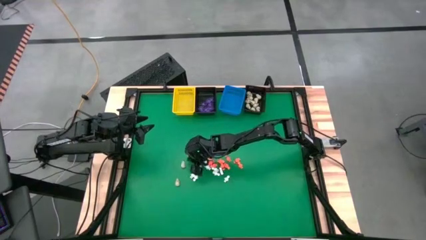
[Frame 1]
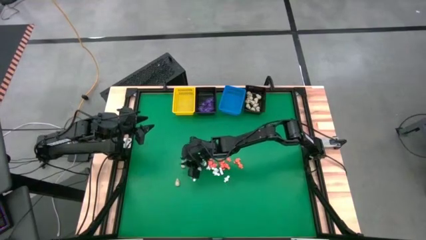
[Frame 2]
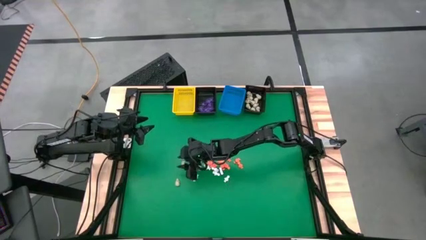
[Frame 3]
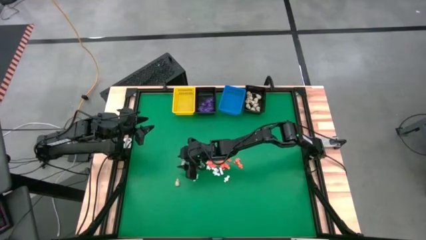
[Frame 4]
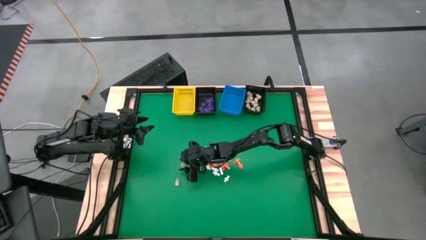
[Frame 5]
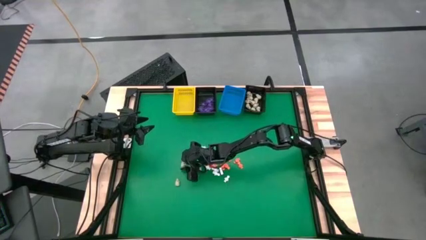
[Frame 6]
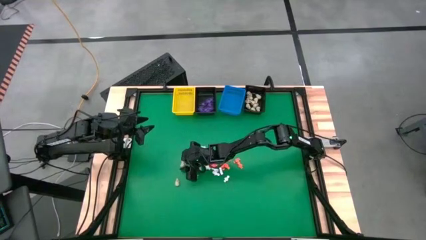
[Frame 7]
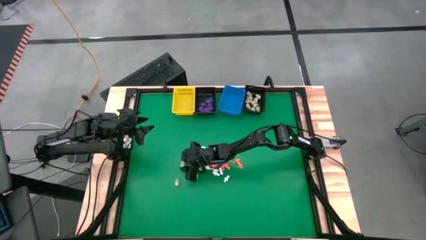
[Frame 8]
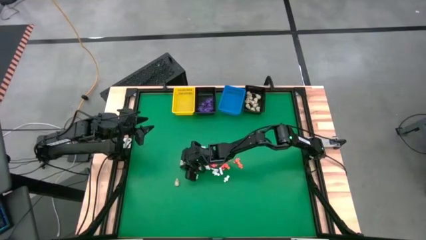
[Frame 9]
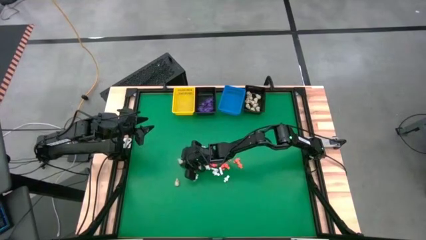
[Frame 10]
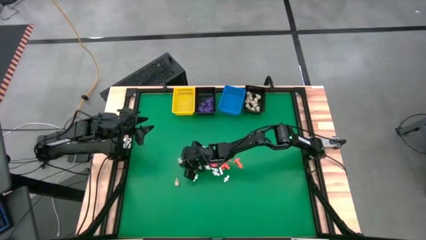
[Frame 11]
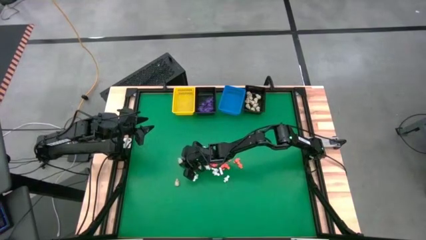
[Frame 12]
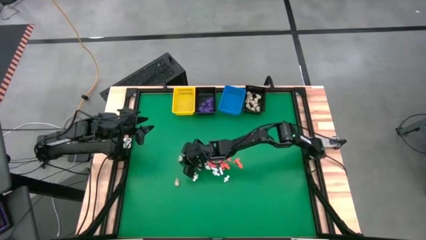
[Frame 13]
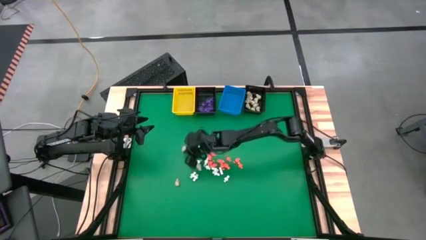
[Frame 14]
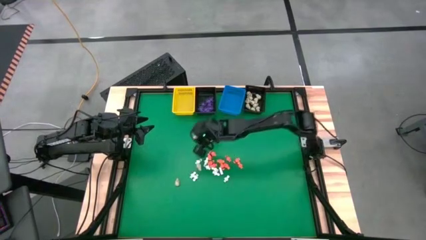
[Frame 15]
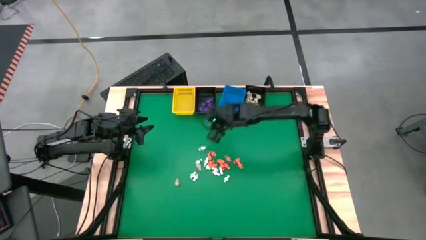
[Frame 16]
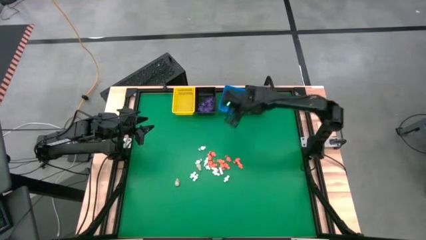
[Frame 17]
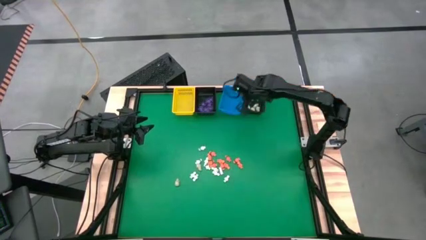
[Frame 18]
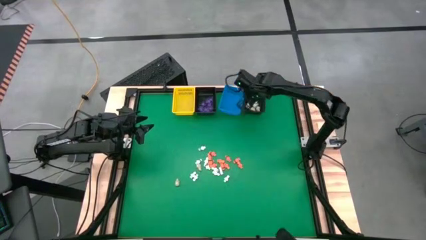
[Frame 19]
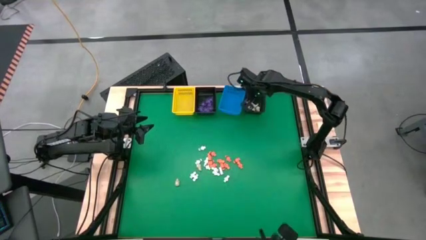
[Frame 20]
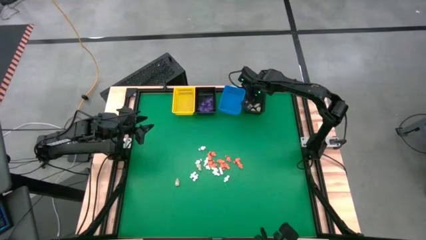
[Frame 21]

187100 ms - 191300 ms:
Task: Sort Halloween decoration
Put the white skull toy into the right black basket

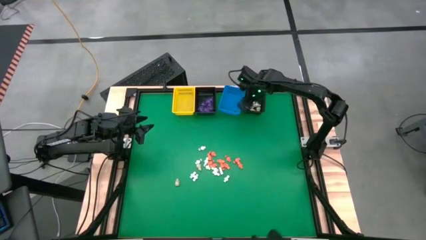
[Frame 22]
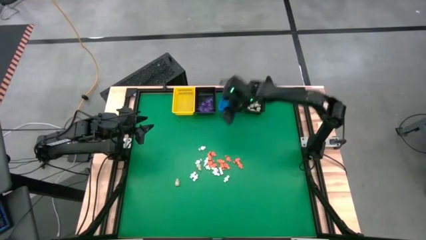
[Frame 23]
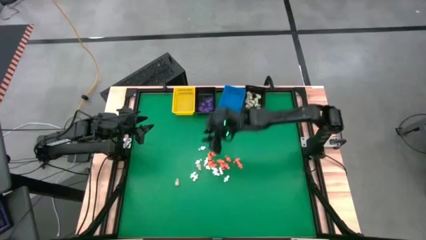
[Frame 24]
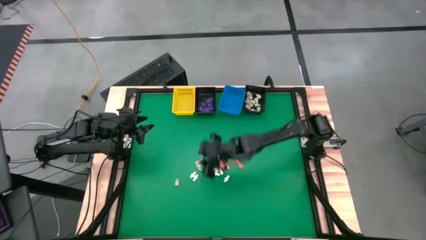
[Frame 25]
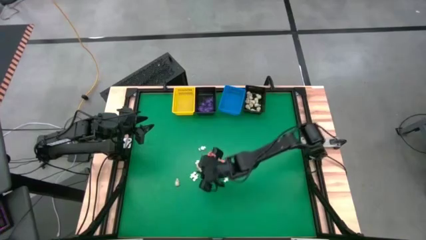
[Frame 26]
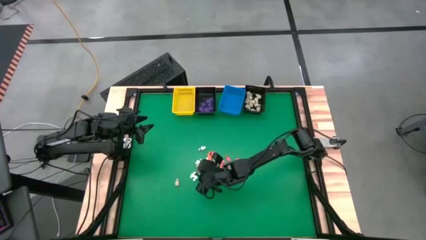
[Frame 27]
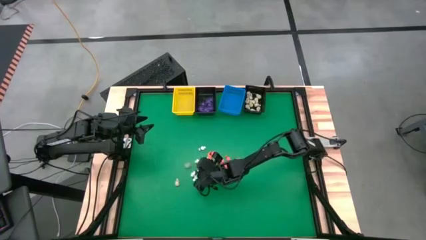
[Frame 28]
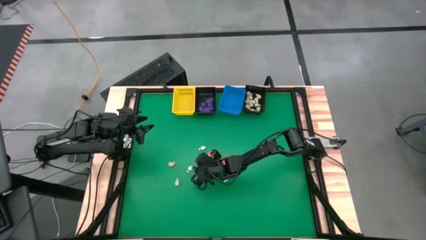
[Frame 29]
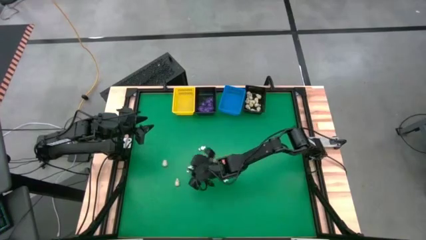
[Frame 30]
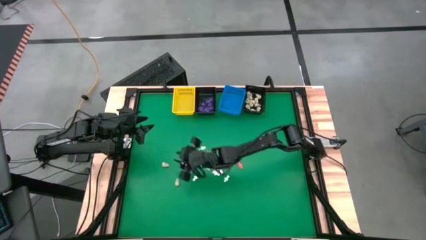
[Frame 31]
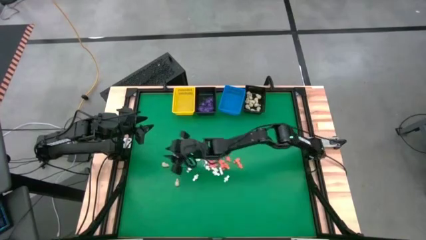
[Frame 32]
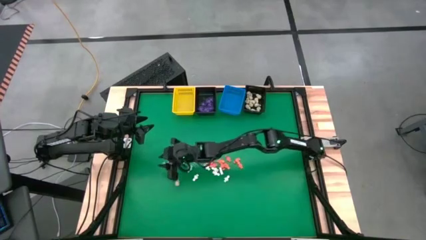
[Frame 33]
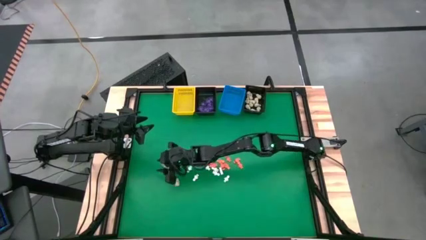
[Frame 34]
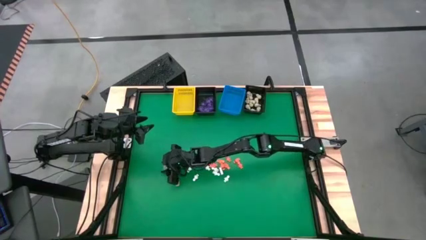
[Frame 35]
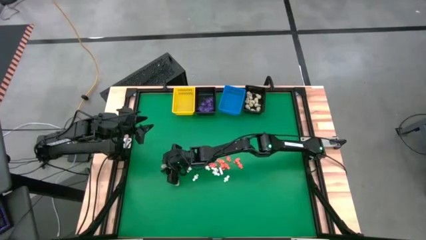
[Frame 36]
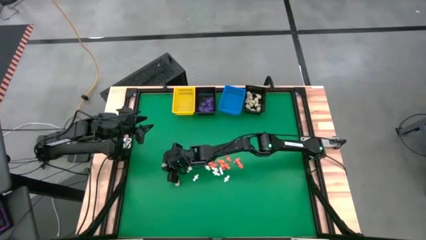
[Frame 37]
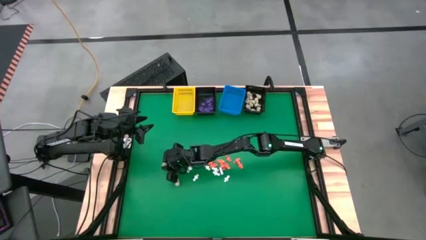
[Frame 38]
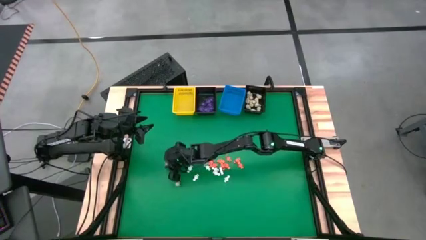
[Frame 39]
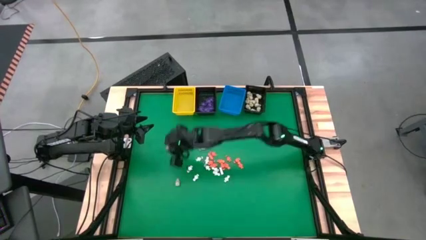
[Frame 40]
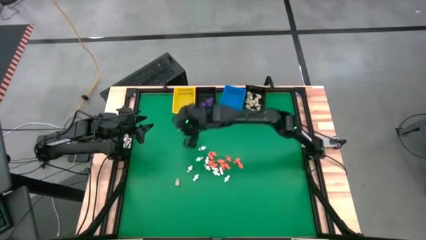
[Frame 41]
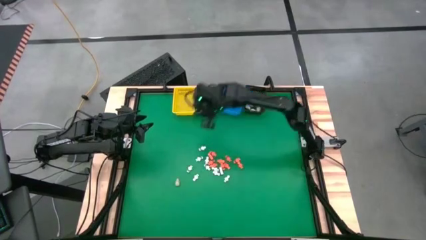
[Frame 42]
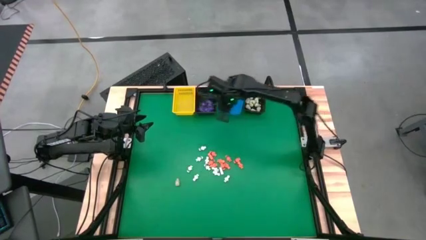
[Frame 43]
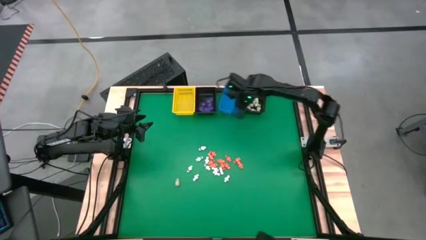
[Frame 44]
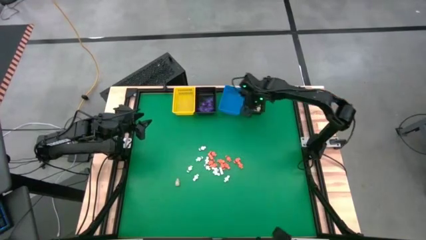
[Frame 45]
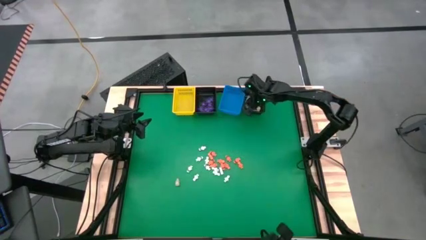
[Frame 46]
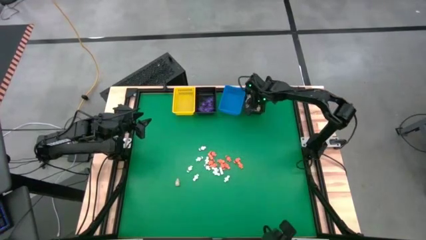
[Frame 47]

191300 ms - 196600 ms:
Put the white skull toy into the right black basket

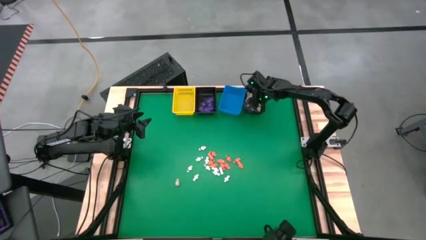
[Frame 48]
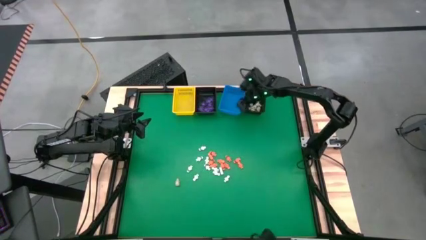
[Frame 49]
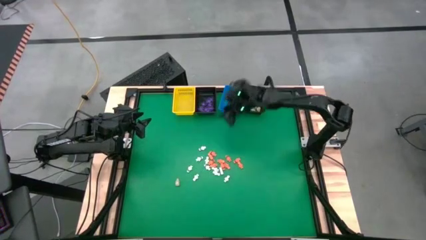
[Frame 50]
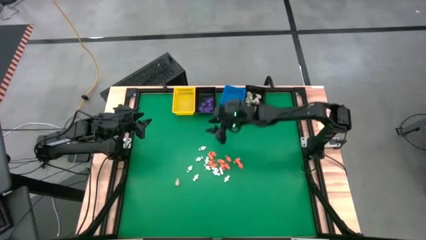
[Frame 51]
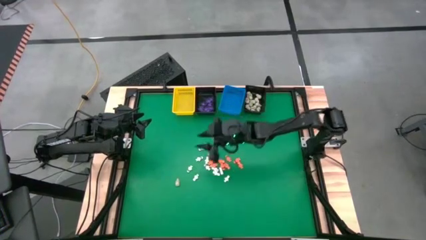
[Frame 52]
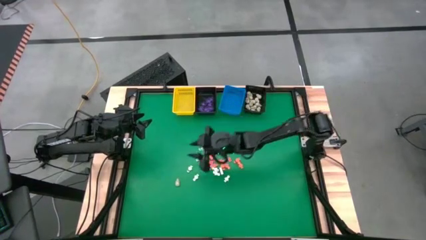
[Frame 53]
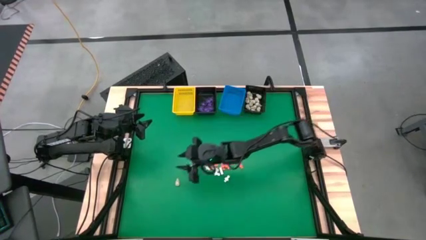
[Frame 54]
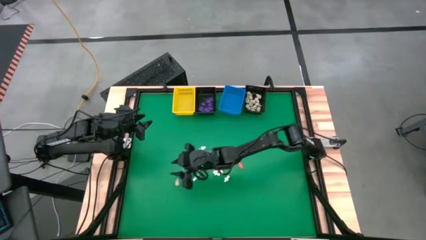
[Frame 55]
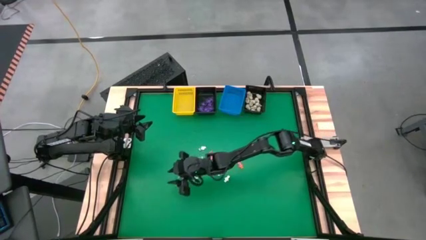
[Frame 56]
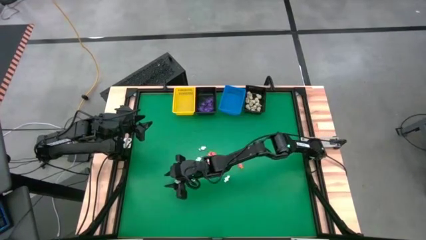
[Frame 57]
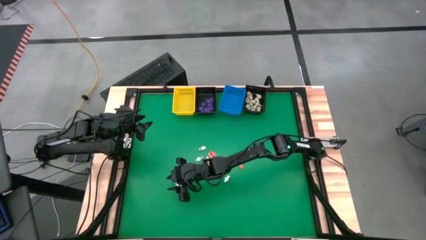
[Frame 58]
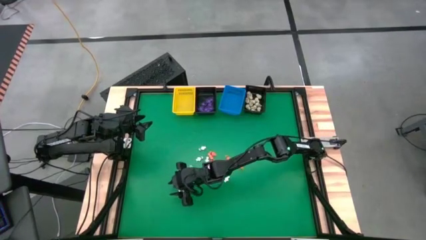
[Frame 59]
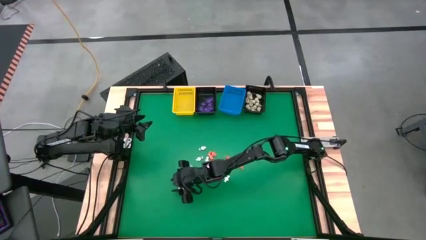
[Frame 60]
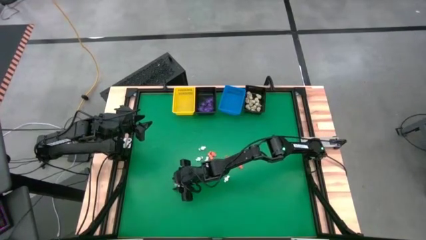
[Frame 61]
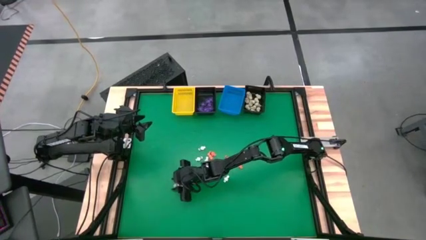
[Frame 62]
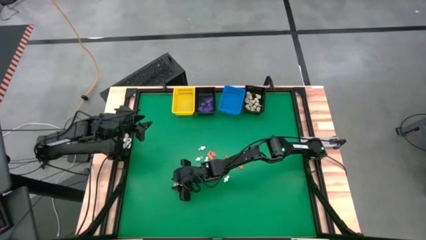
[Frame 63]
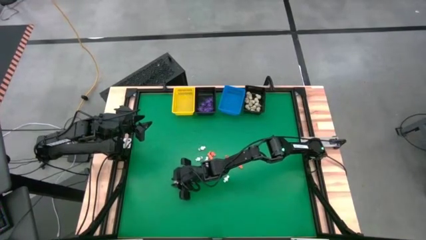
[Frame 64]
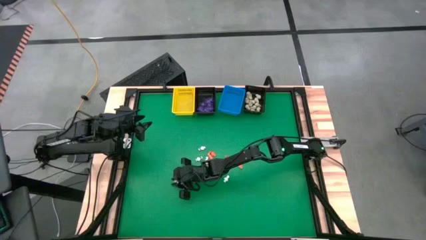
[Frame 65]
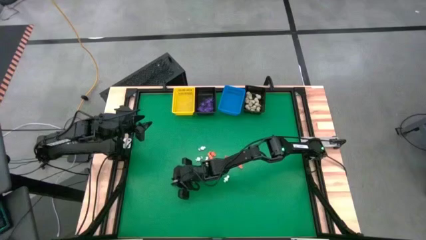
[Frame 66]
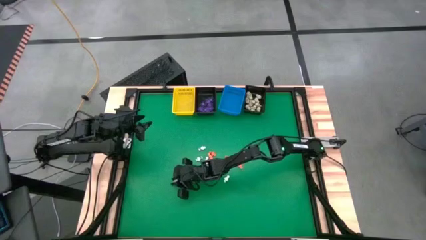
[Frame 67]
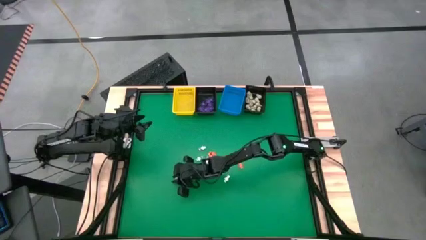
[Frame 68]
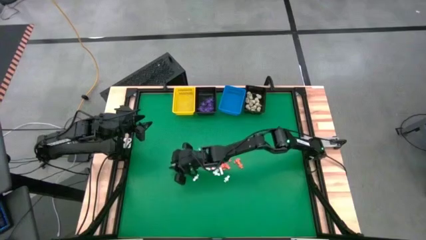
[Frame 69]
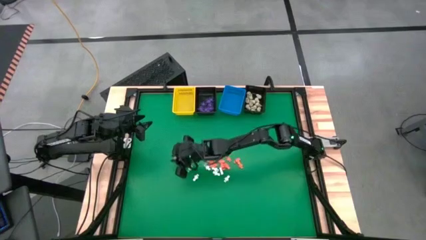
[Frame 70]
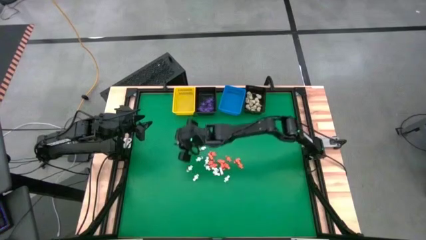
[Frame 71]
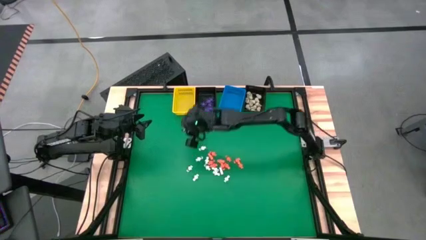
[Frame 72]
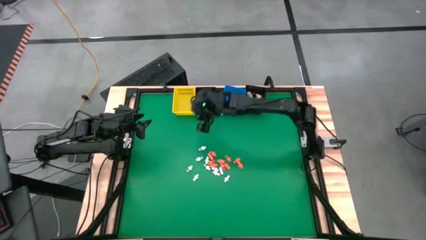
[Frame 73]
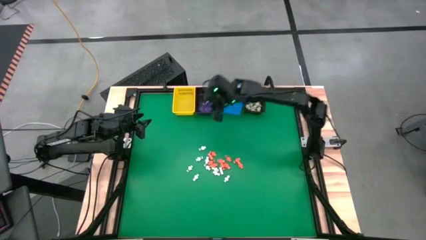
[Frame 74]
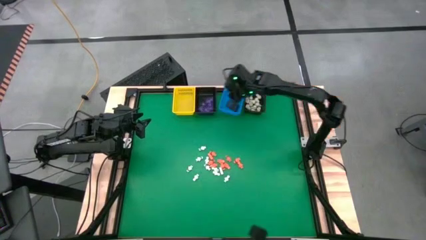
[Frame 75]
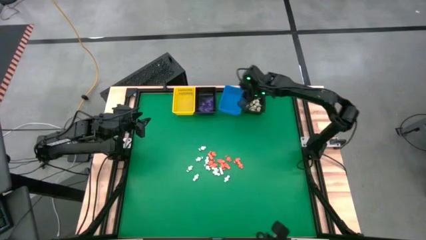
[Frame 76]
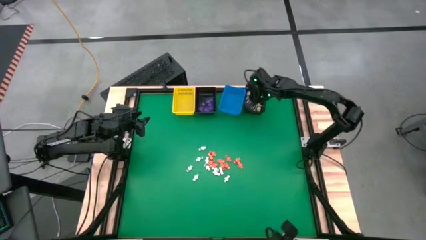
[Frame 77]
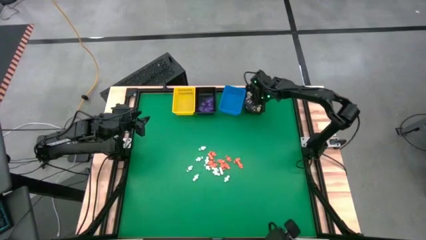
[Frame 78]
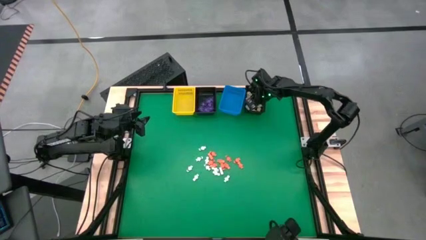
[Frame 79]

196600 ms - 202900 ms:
Put the white skull toy into the right black basket

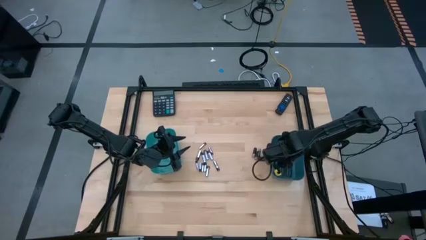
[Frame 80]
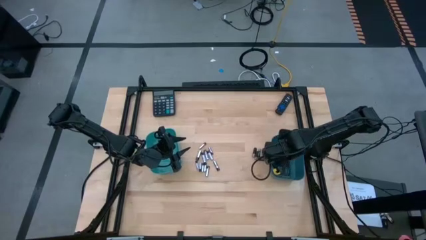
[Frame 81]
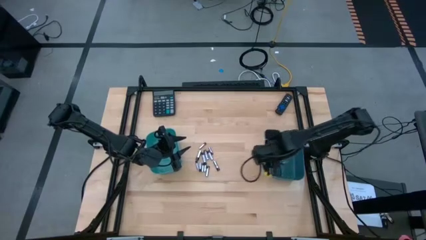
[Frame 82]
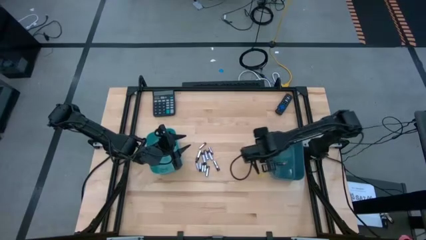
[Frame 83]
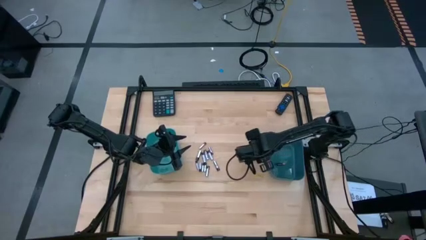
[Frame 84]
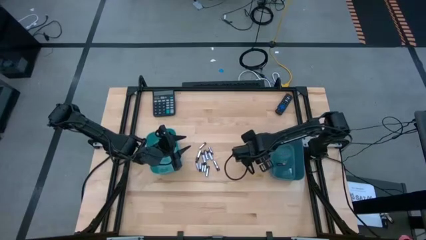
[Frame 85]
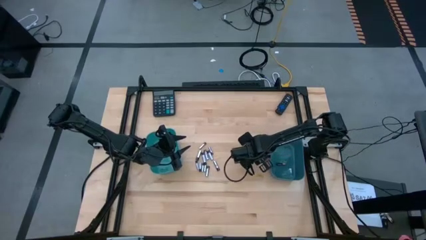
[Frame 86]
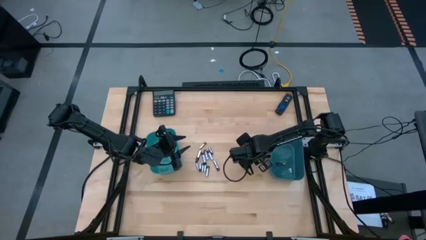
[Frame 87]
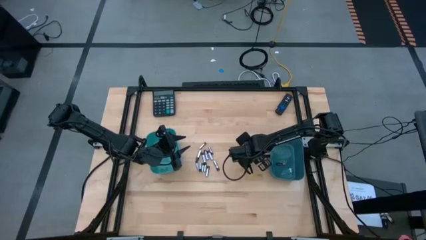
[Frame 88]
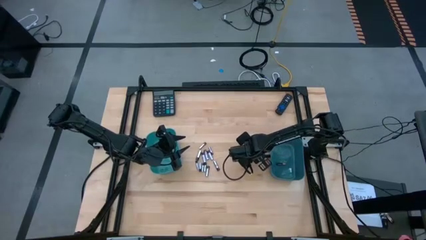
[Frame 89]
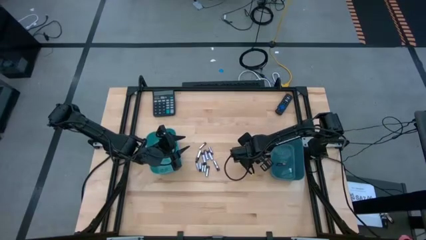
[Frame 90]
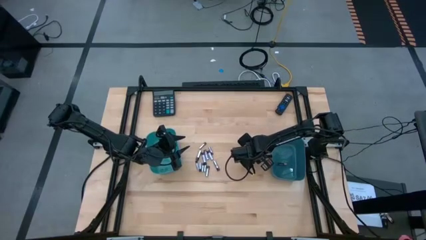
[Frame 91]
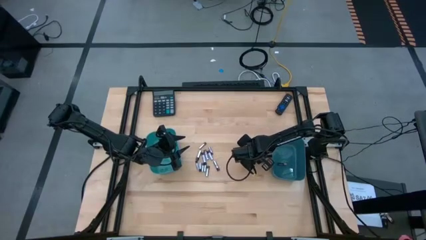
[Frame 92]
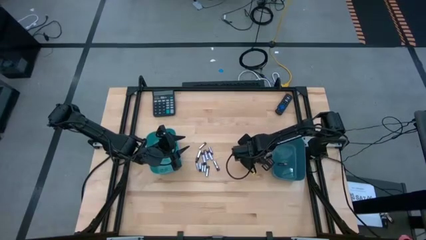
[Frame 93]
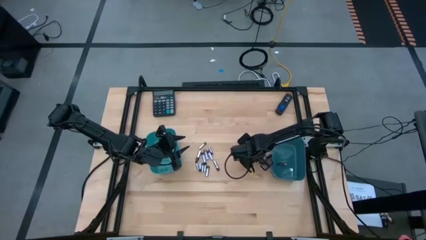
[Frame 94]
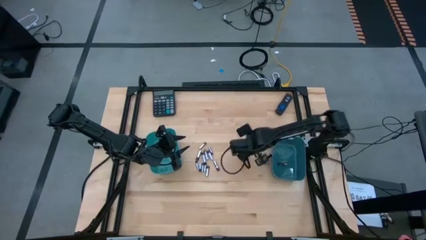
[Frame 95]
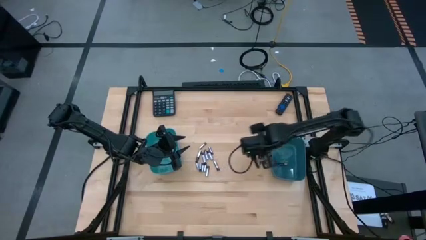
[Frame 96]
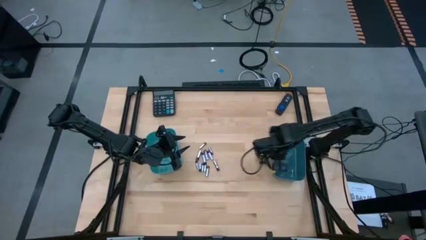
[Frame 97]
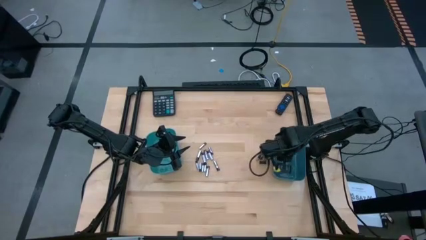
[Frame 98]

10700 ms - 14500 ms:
Task: Sort batteries
Put the black battery into the right blue bin
